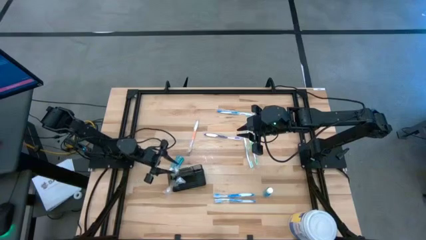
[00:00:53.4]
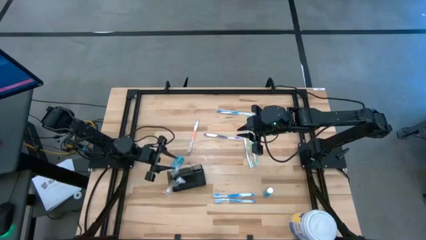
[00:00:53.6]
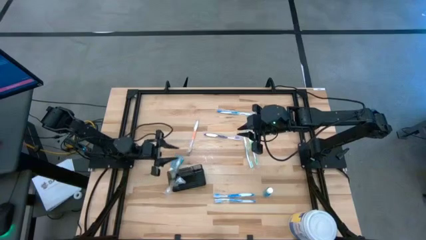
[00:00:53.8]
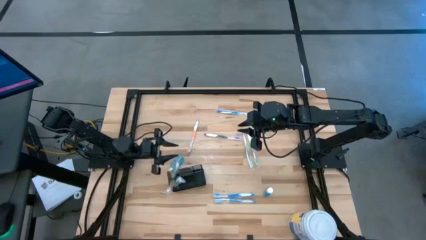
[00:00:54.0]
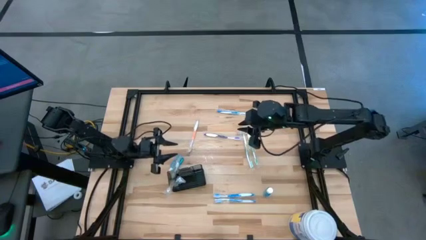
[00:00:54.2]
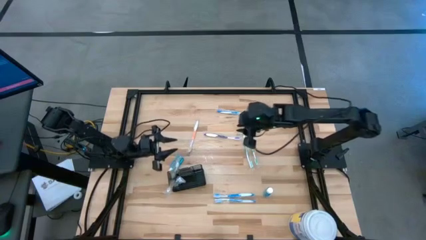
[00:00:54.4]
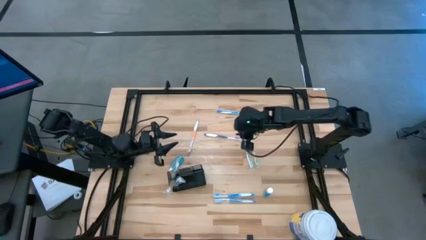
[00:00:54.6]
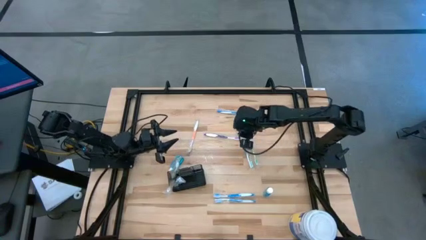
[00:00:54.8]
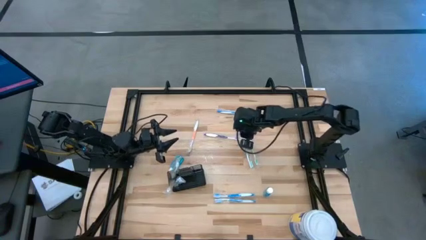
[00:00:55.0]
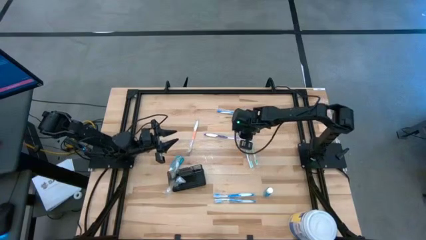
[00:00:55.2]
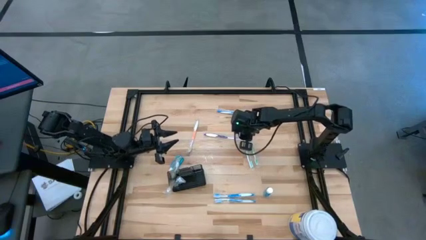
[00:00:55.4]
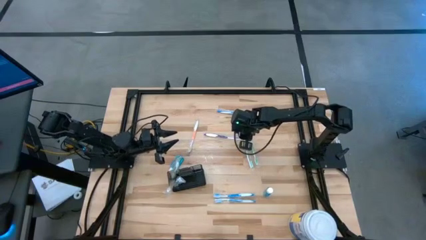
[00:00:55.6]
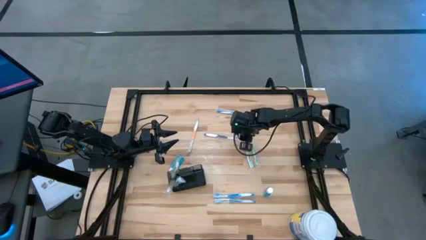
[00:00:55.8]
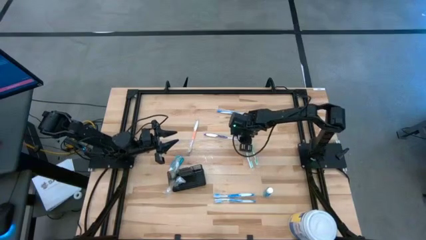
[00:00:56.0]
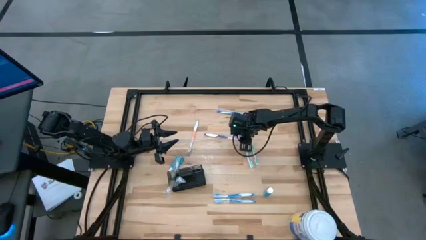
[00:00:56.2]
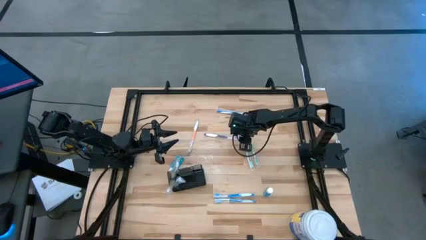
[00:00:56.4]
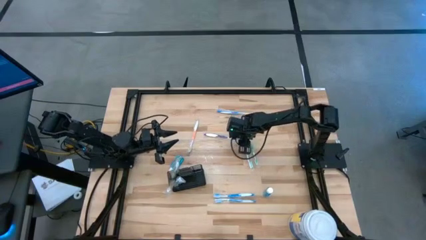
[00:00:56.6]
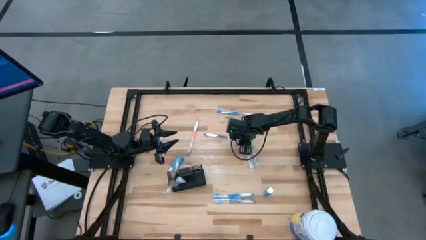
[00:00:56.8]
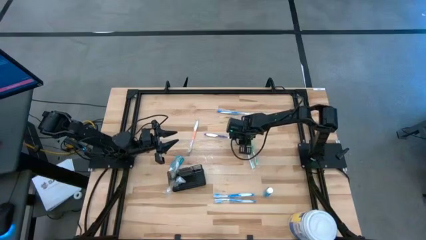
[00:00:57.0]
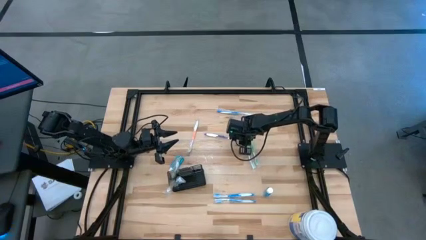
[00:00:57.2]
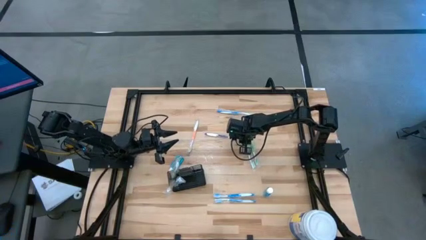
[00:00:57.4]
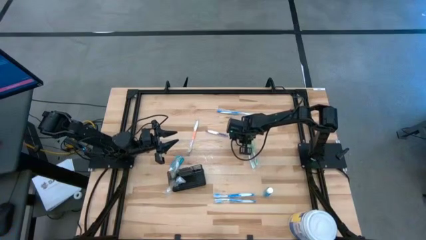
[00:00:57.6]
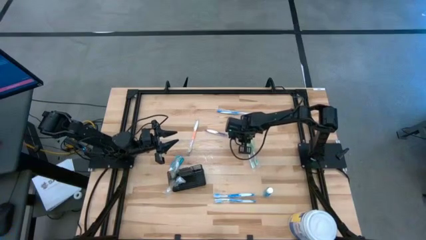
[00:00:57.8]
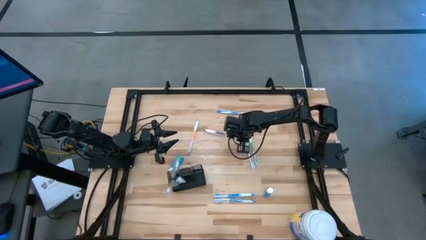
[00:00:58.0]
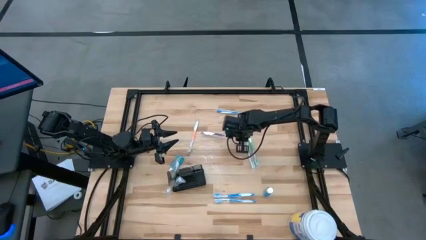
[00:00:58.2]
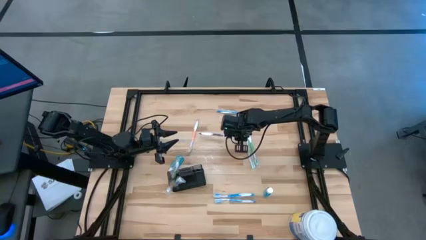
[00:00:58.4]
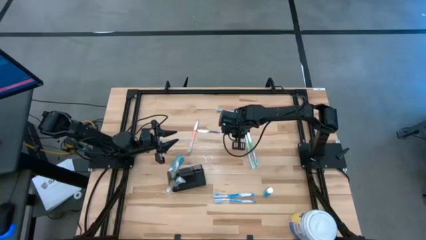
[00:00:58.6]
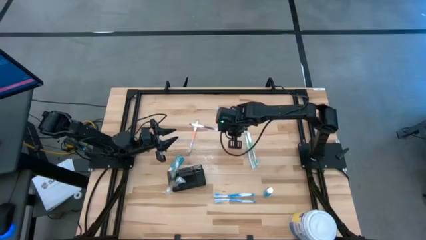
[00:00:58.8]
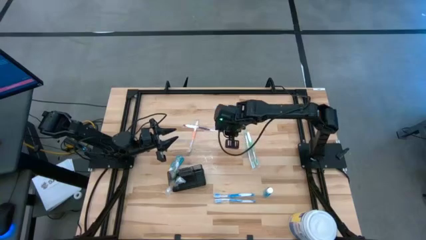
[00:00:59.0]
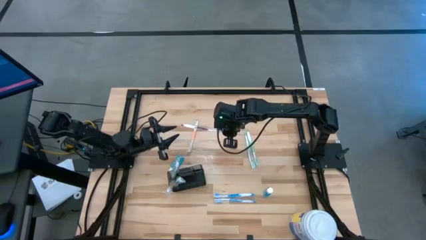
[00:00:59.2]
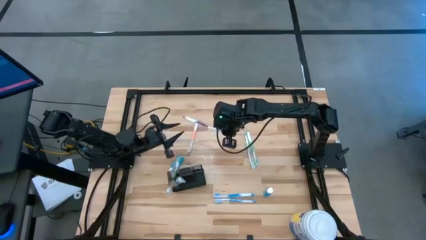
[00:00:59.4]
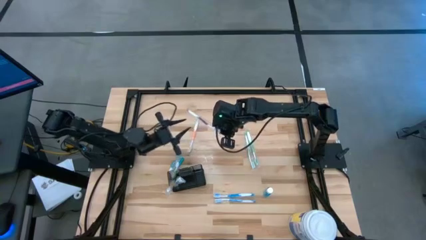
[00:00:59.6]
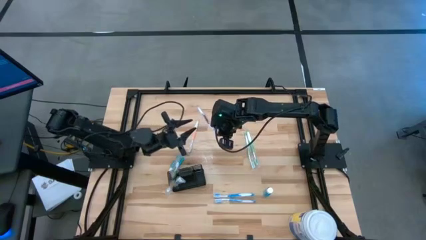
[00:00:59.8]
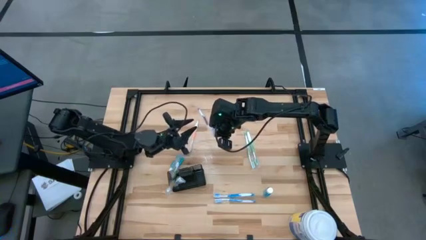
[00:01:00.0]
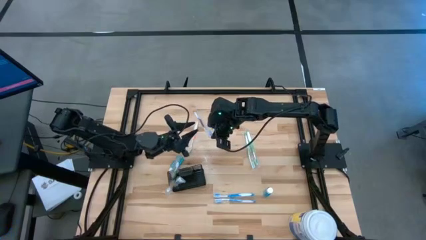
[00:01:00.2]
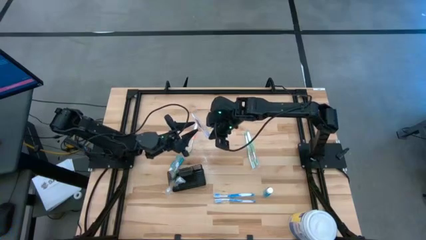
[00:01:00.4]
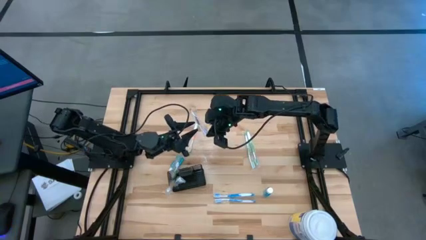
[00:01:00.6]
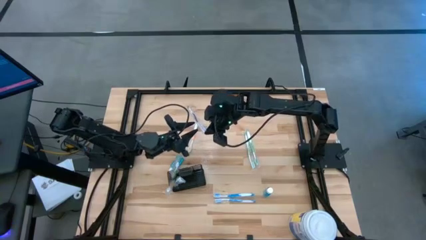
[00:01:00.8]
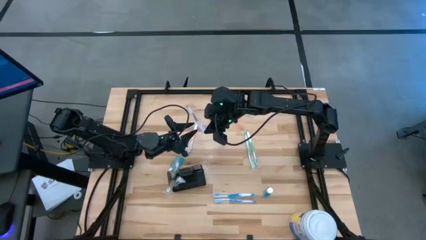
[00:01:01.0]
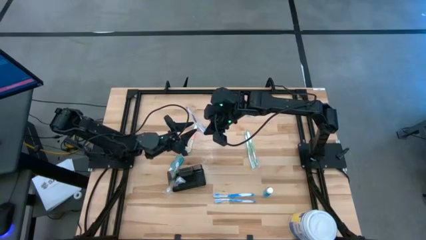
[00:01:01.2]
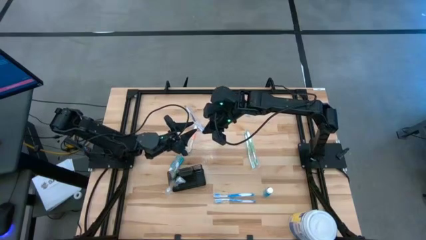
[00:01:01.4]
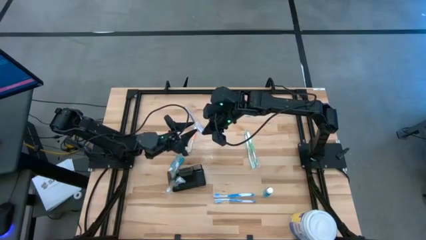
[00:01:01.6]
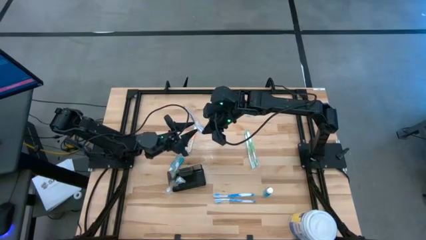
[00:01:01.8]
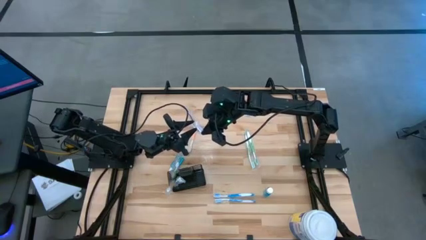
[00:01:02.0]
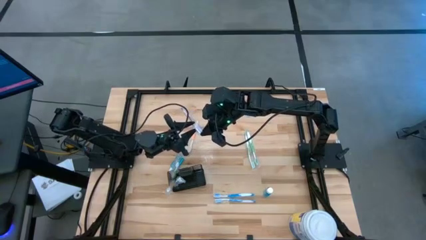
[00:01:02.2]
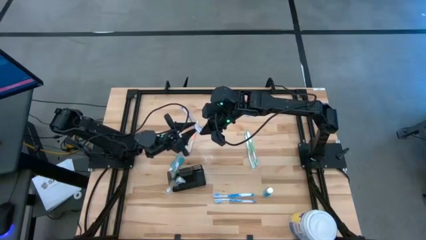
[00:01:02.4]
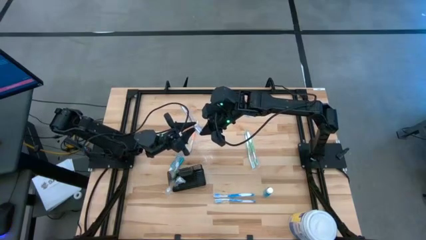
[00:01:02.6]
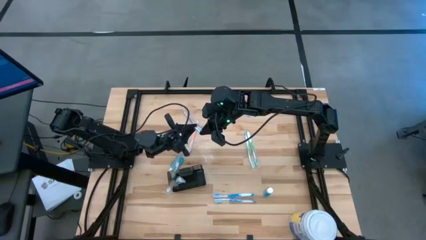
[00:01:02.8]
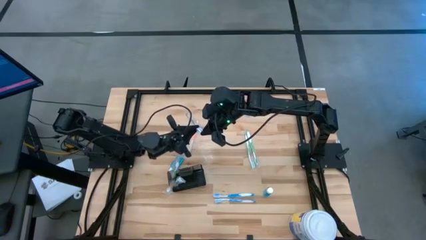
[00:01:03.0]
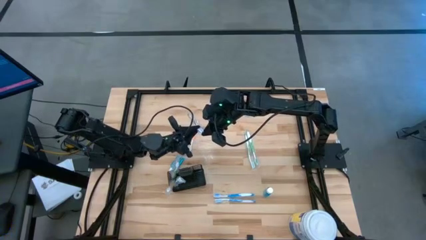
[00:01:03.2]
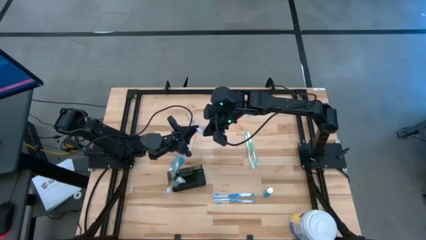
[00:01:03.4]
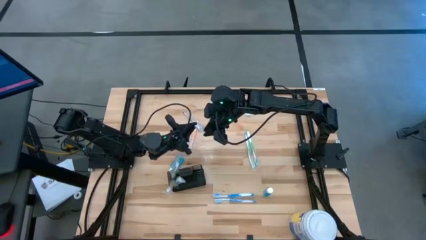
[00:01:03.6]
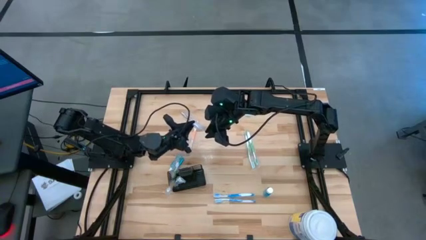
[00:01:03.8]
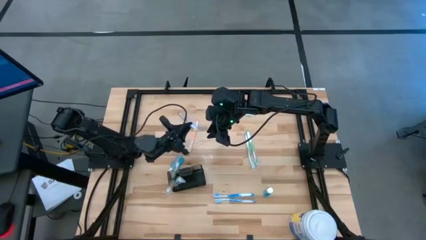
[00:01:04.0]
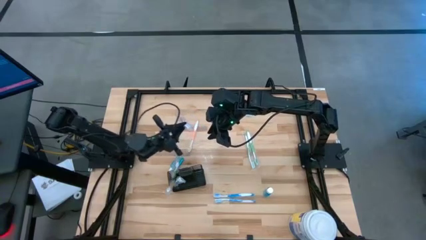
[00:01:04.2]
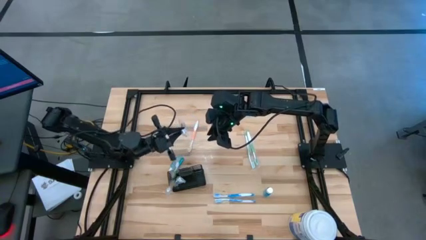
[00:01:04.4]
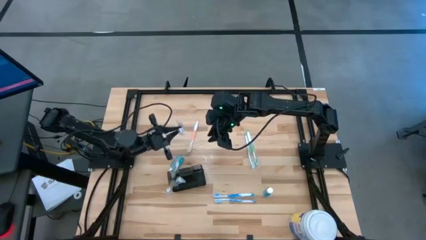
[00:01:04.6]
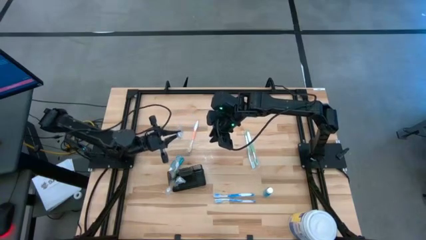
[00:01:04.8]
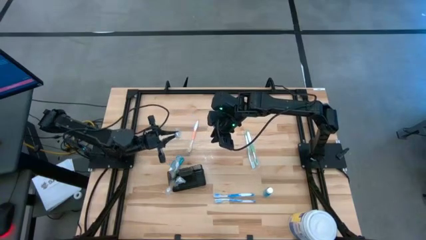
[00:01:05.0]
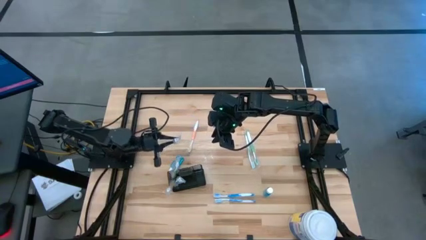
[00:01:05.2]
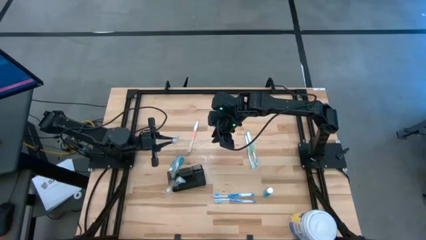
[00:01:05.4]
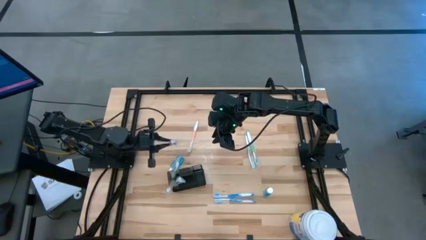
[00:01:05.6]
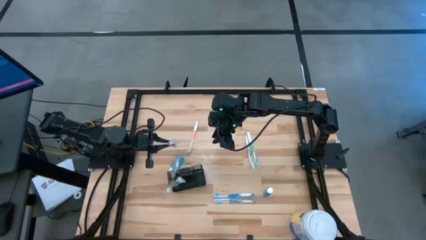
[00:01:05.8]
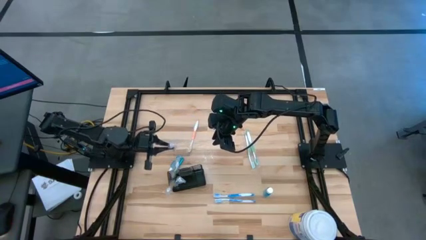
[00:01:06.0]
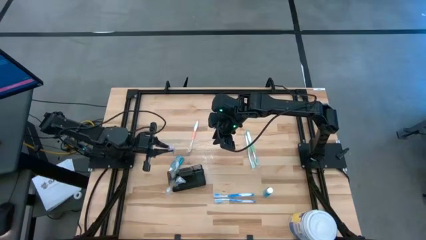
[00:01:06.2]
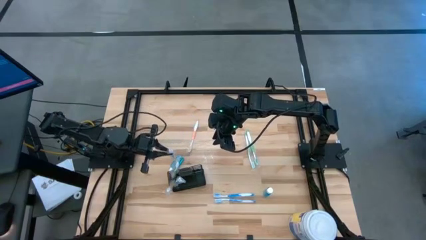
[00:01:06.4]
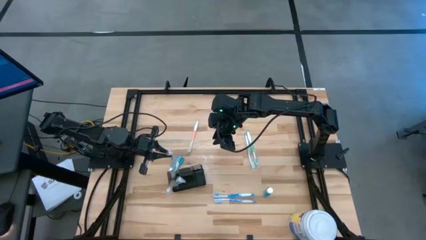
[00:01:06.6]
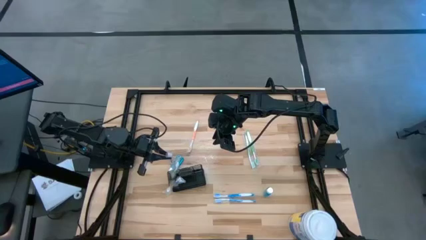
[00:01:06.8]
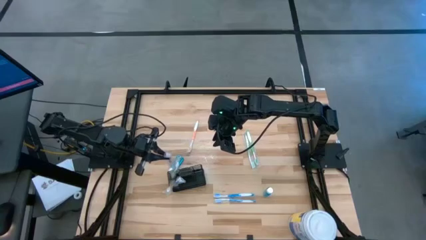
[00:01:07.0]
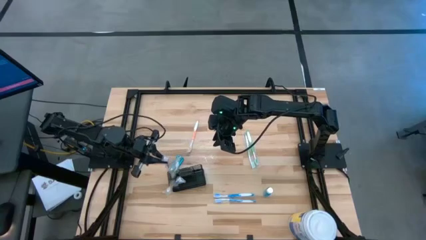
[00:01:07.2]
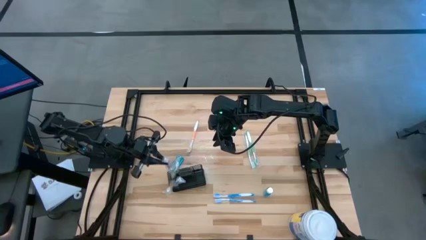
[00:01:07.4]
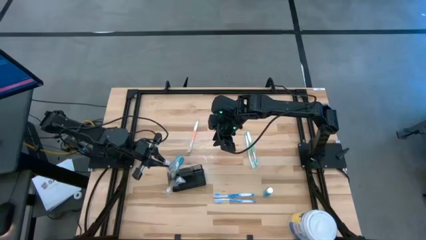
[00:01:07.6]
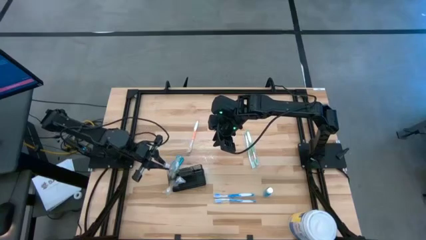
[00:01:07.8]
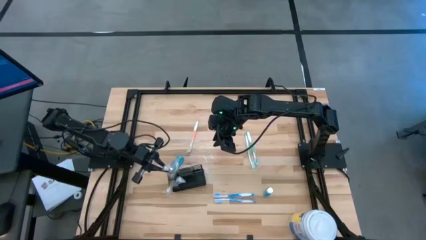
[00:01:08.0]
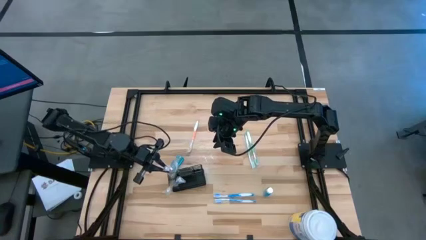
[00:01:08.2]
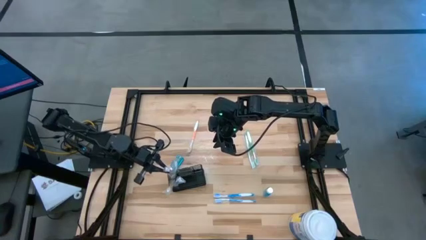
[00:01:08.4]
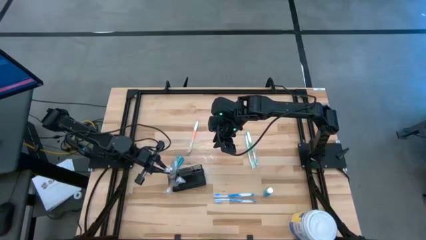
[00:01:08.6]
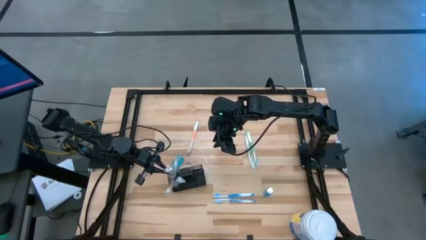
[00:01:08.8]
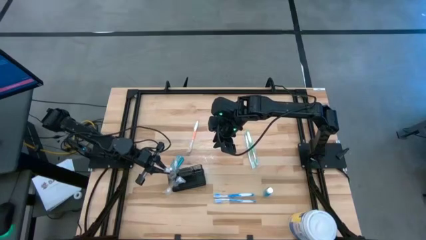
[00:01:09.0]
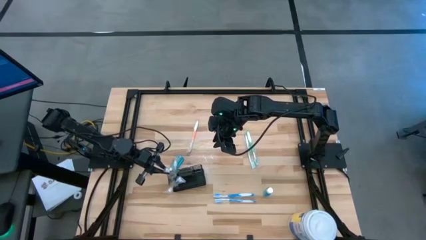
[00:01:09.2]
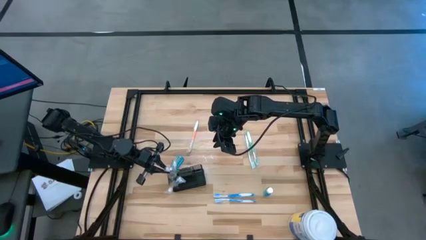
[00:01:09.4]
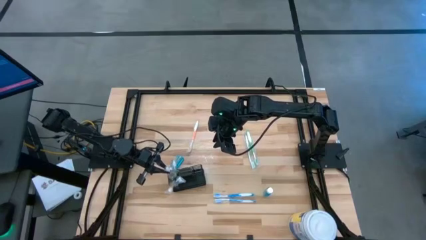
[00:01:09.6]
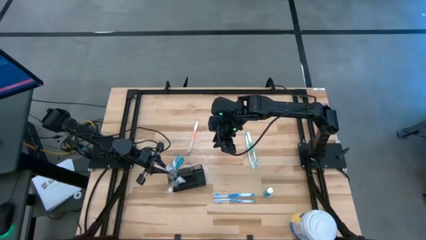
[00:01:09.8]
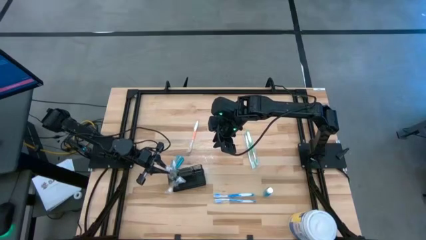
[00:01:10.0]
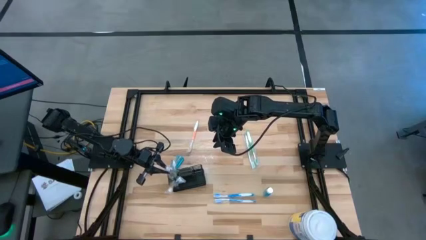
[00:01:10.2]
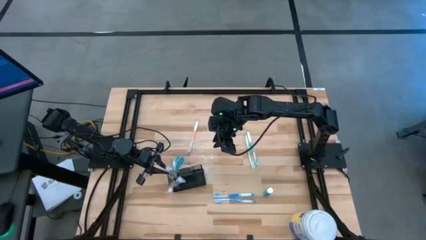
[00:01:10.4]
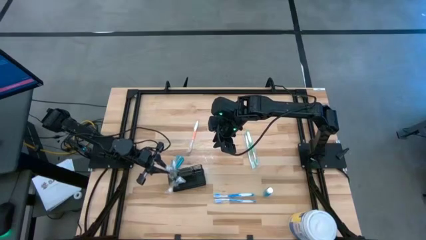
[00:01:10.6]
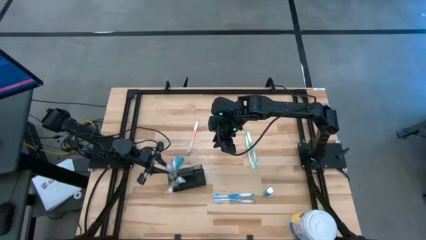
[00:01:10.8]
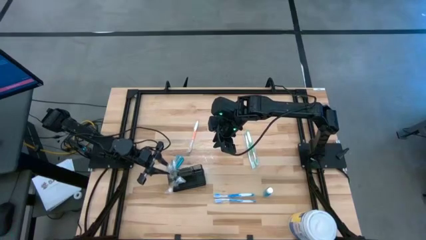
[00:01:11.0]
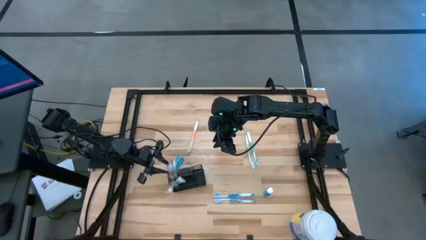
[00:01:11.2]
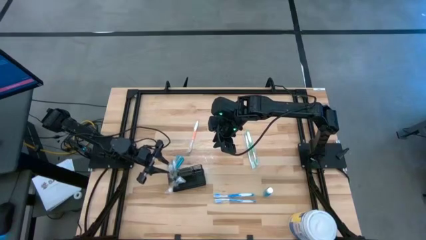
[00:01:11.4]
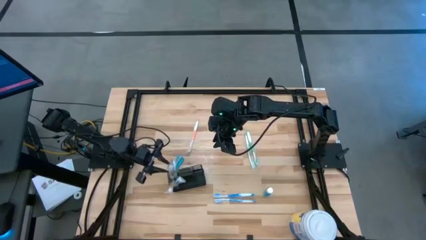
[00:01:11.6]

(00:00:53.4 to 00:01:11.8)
Task: Pick & Place toothbrushing station
Put the white violet toothbrush into the black toothbrush rack
